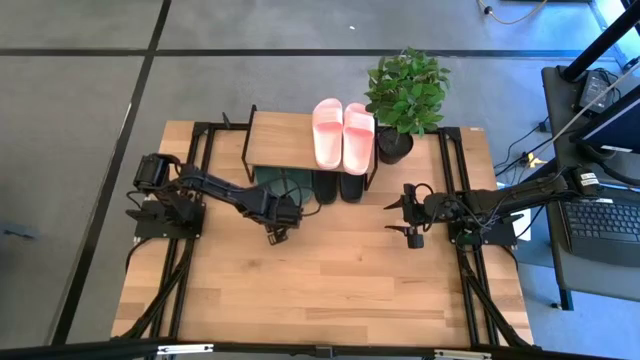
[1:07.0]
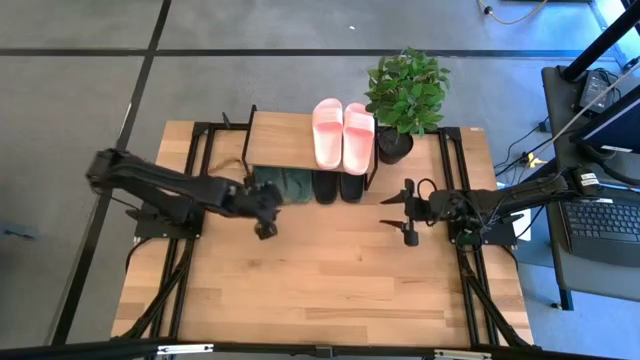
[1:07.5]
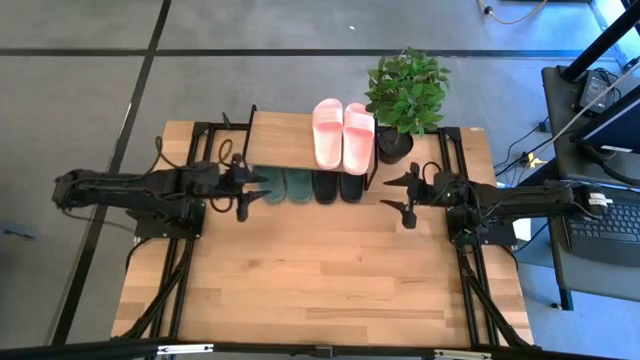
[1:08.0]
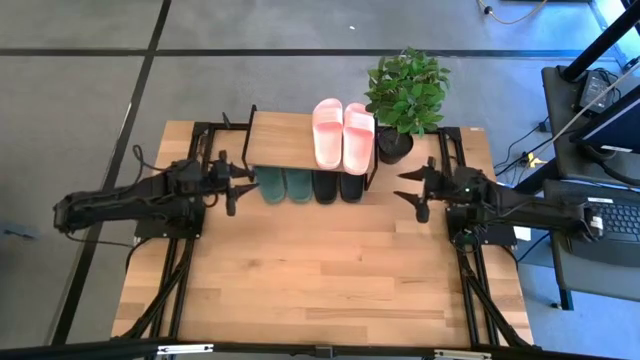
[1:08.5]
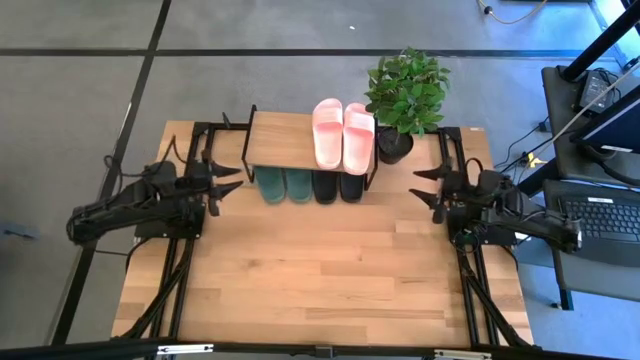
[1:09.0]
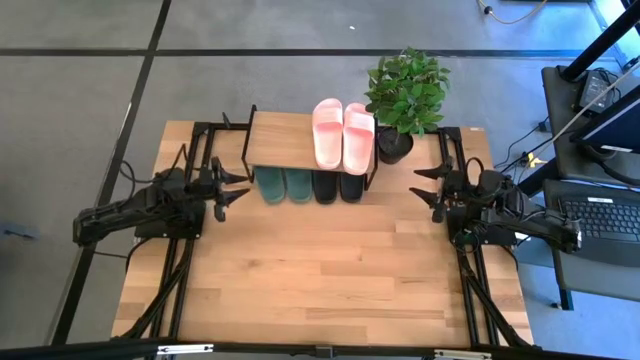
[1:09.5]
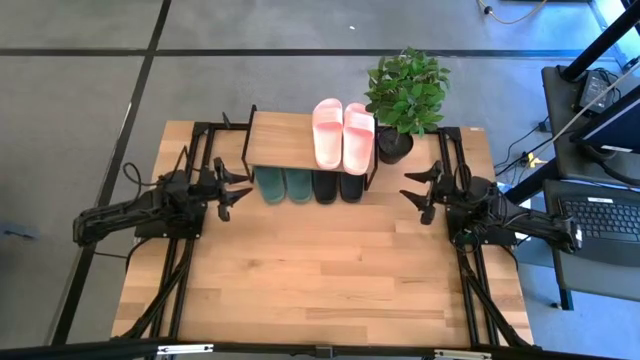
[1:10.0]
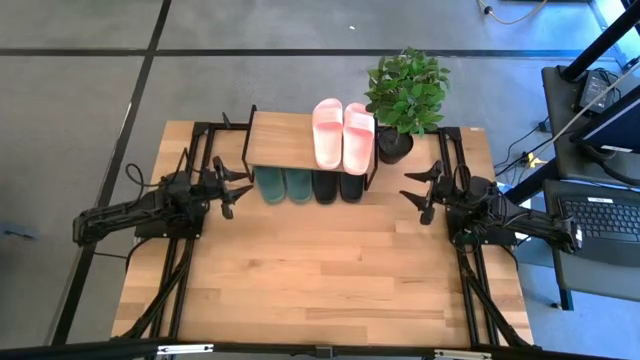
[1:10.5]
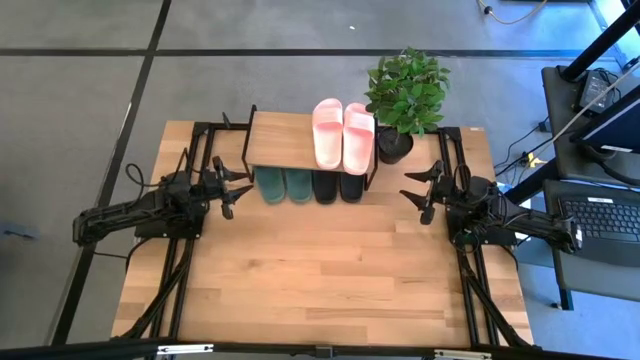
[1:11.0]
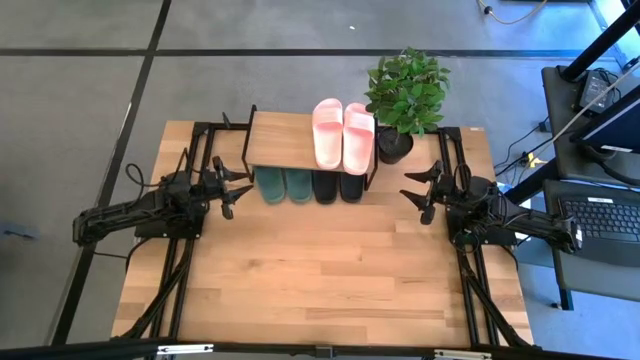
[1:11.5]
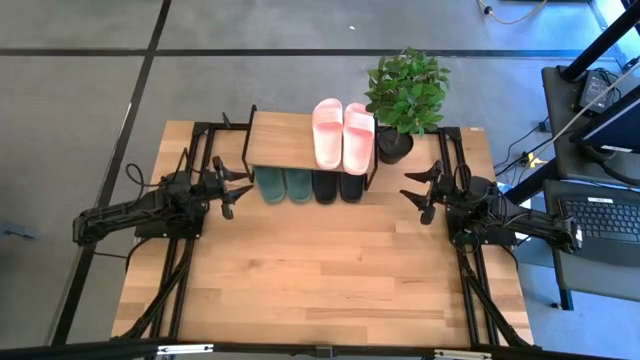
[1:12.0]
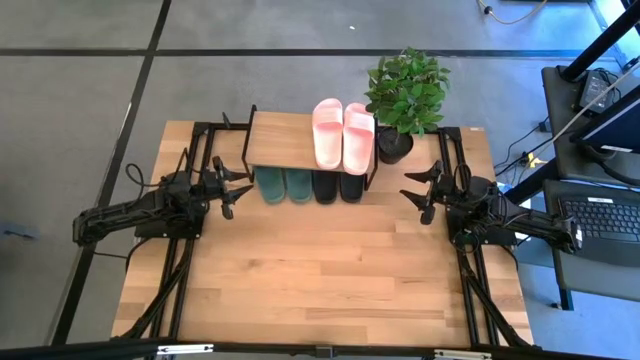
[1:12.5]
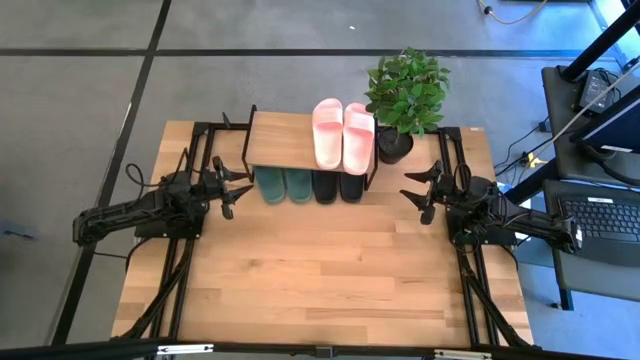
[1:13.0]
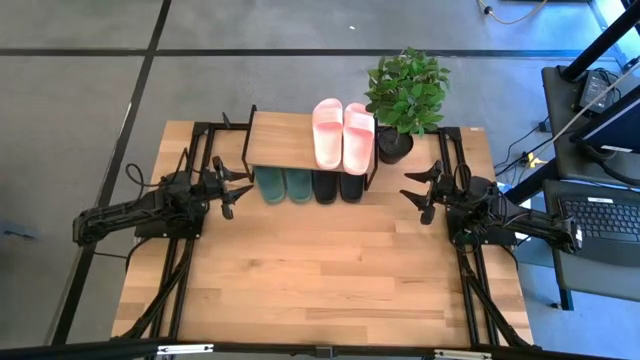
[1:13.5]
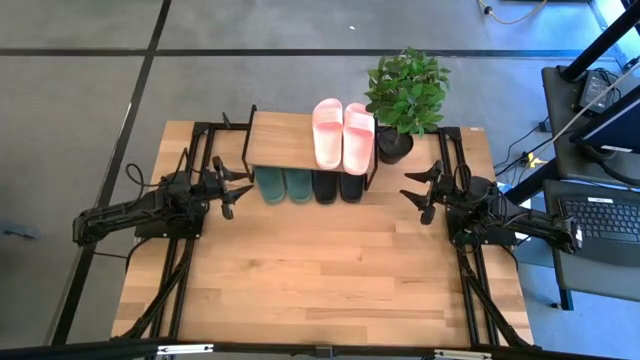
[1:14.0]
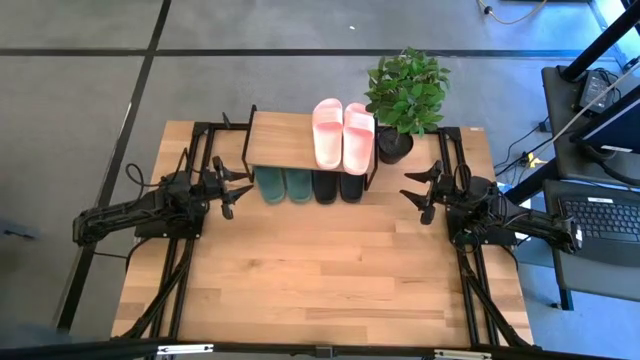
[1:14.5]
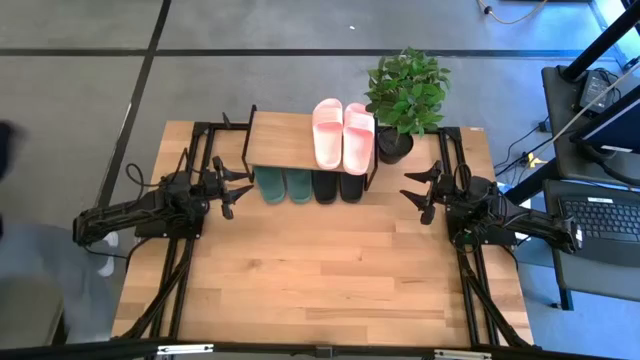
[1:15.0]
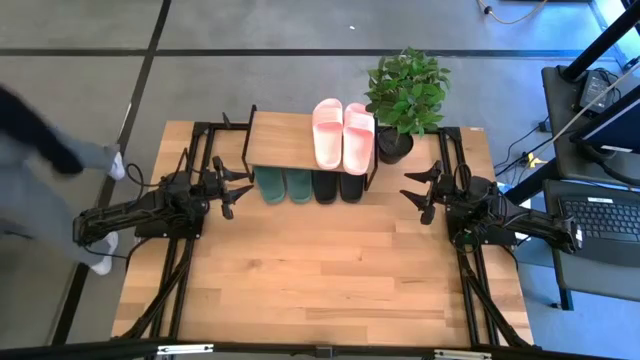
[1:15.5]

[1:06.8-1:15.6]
Task: Pick and place slides into the shelf
Return to Home Position

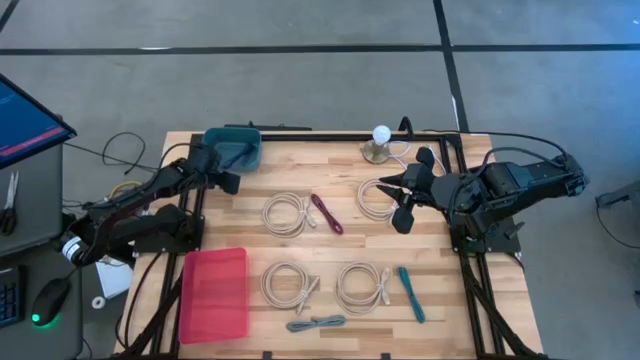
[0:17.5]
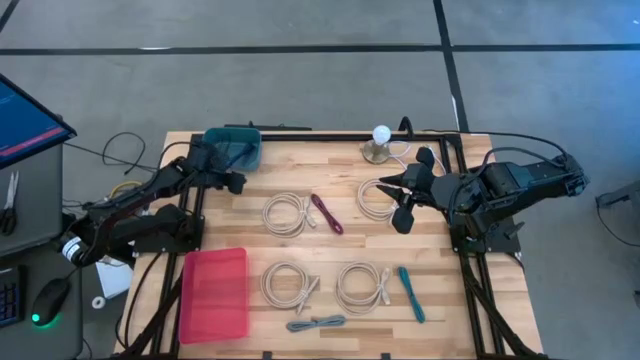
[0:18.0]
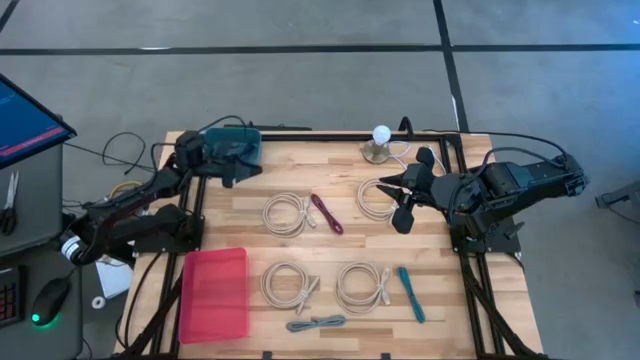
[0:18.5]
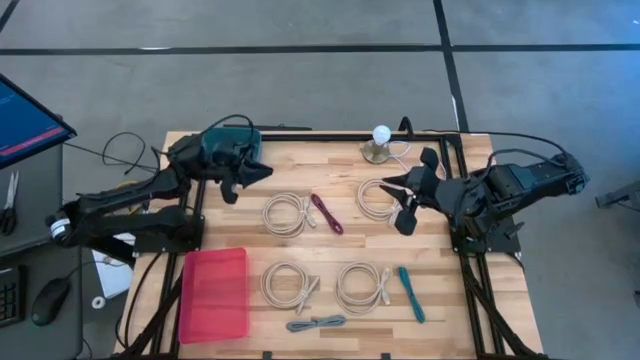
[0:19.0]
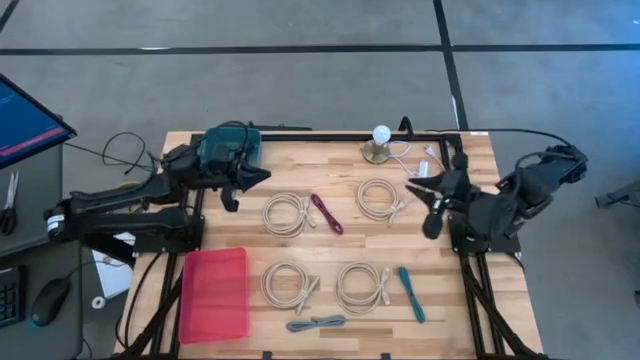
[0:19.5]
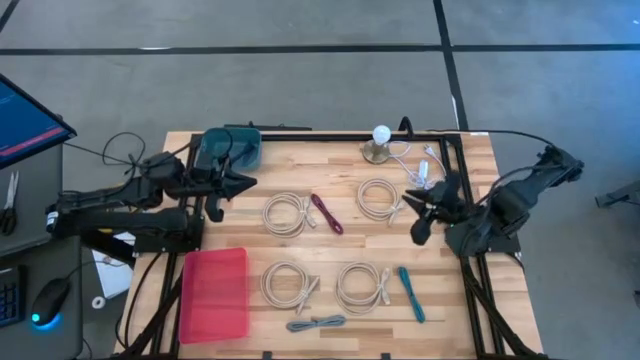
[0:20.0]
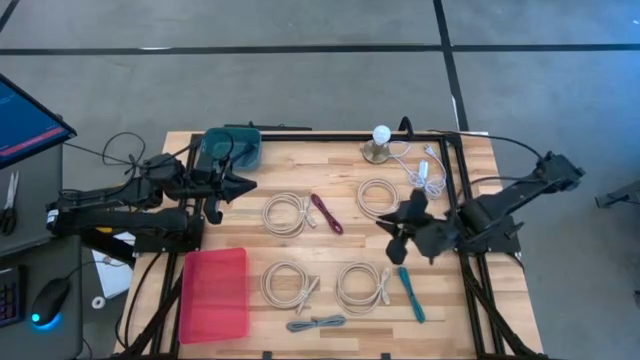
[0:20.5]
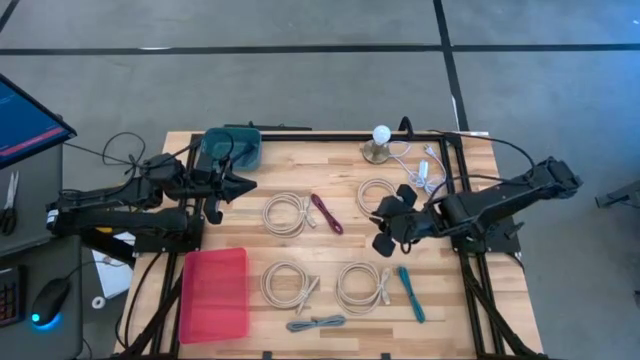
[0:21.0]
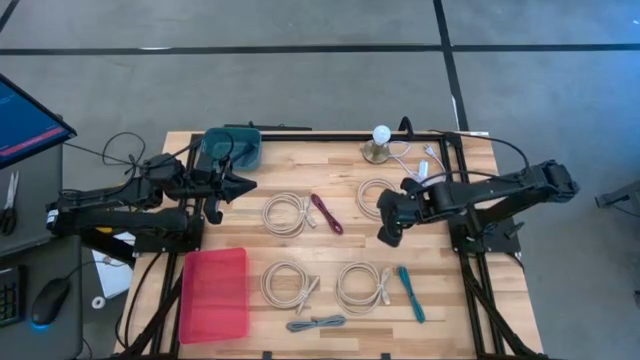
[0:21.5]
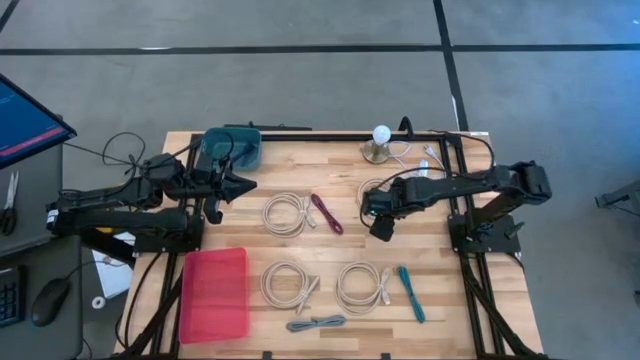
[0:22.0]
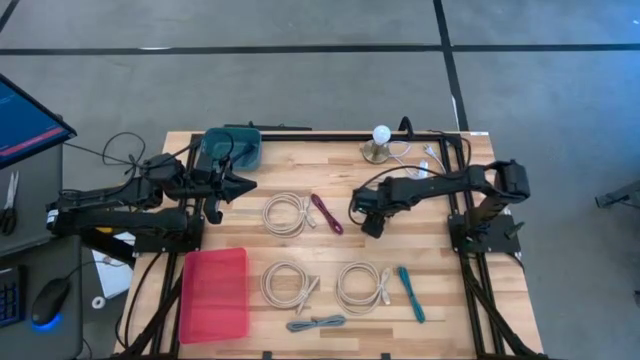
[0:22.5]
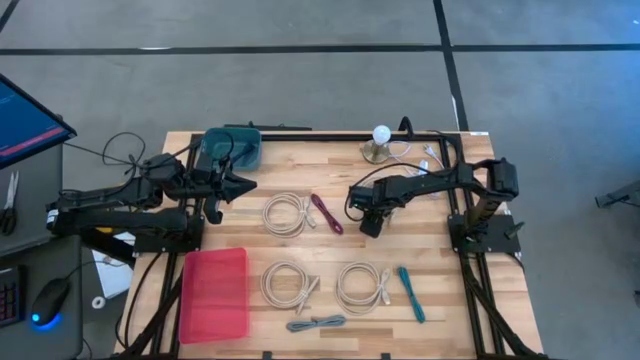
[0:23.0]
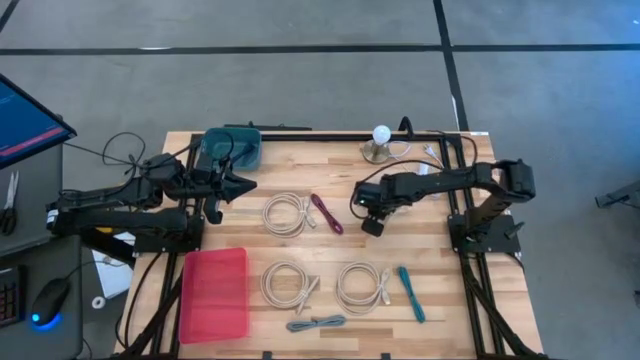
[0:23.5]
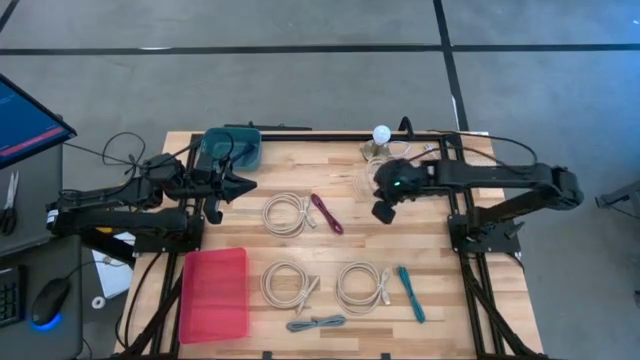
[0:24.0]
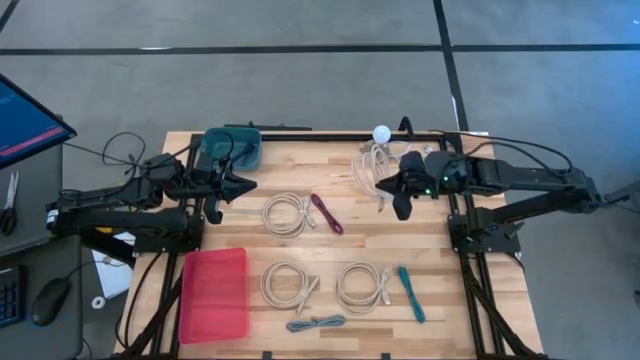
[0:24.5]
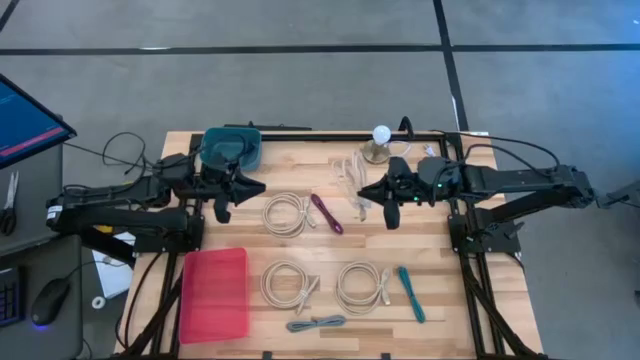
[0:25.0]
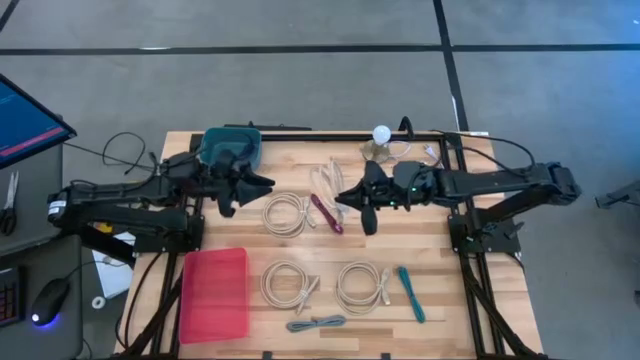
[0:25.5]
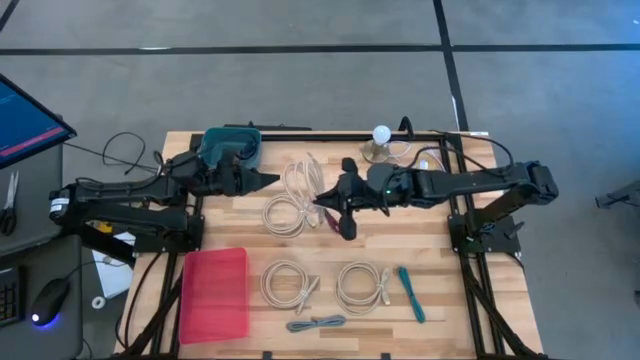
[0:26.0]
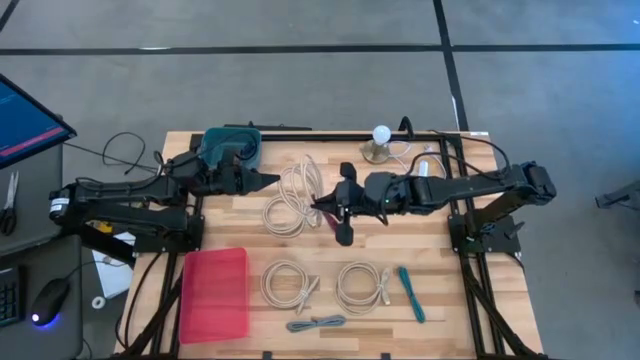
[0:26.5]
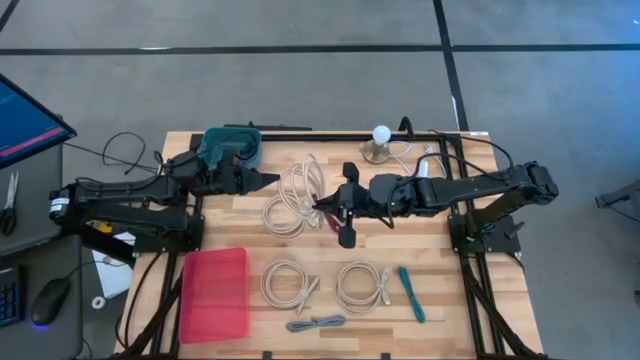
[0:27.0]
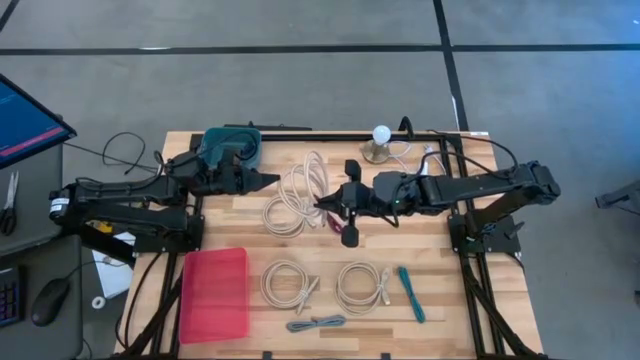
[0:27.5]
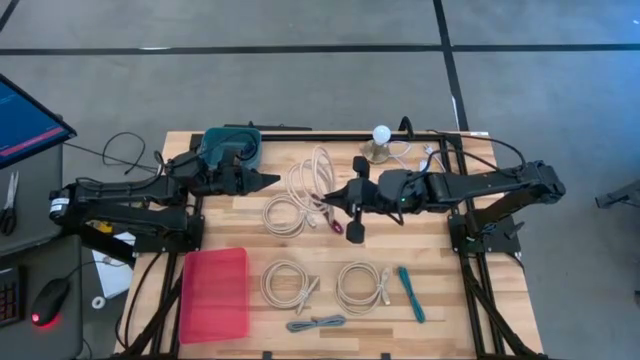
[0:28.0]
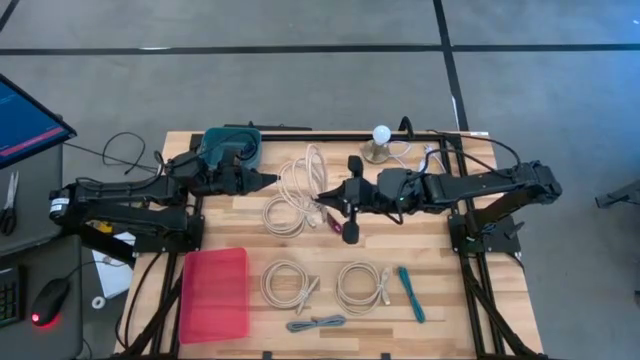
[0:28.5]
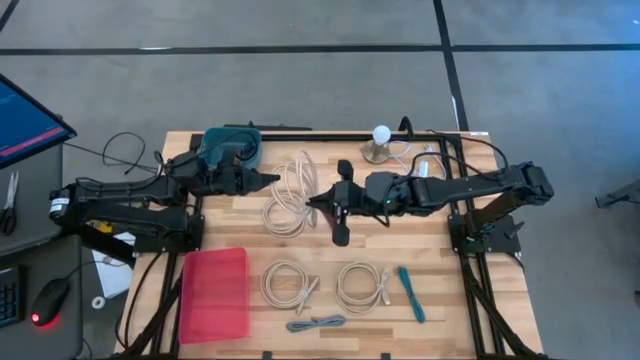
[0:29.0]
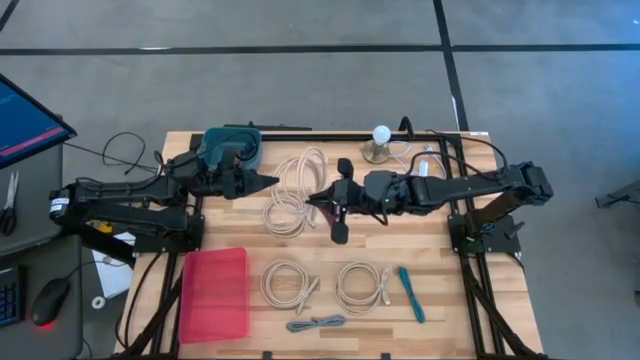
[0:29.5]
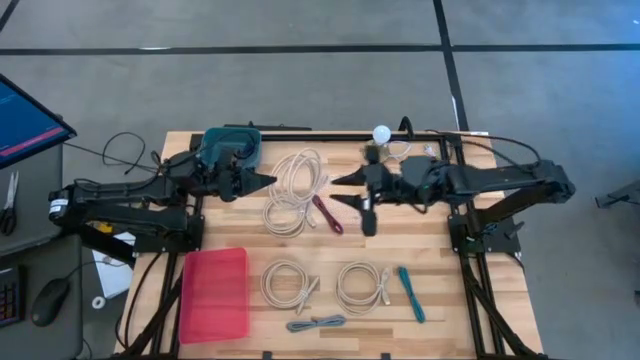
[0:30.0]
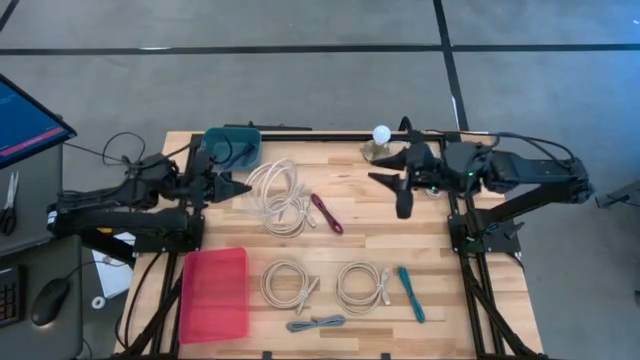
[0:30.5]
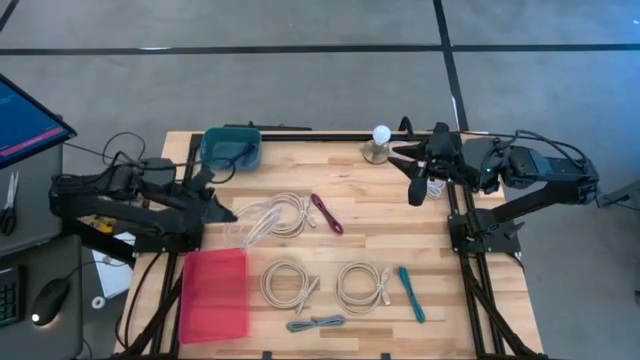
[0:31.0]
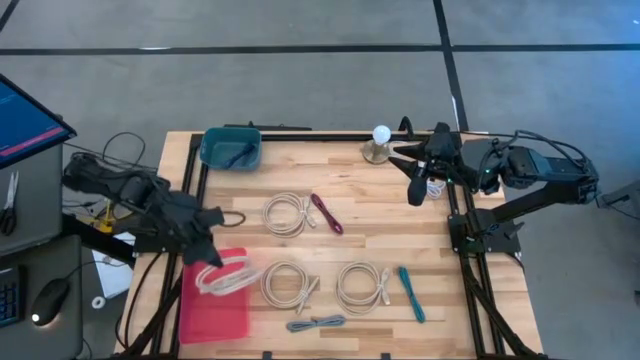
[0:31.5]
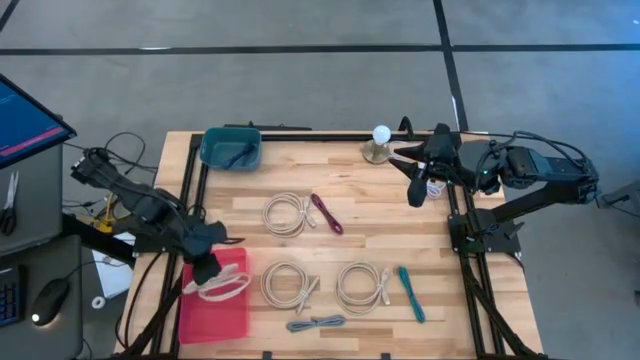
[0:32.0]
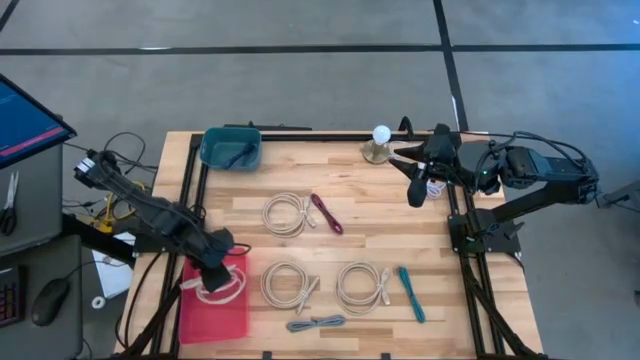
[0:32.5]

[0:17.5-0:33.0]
Task: Pick & Place USB Port
Put the brown HDMI cable into the red bin
